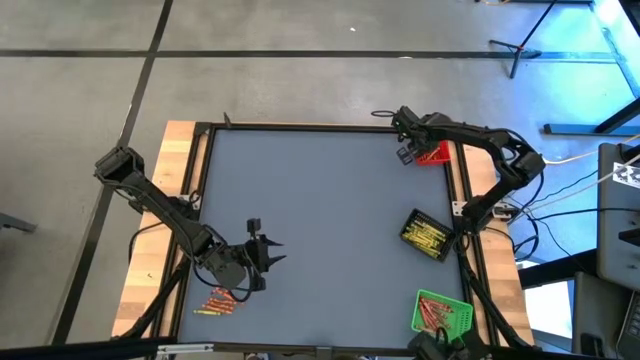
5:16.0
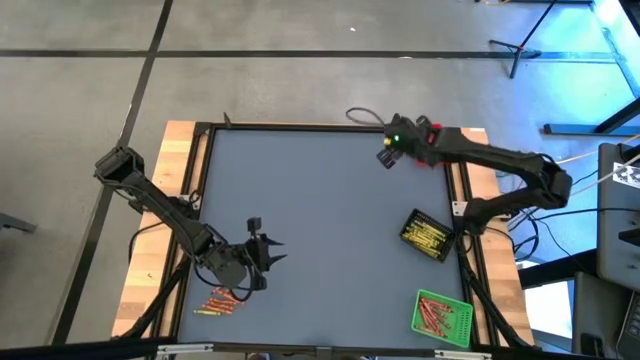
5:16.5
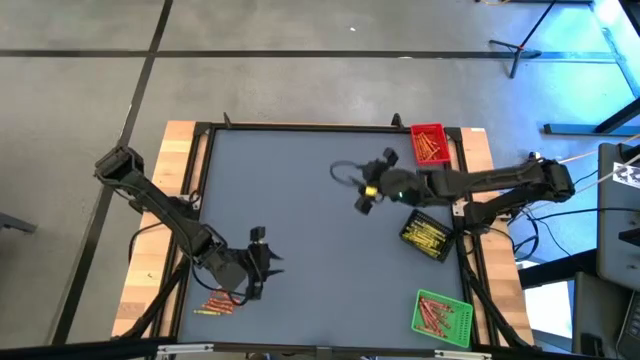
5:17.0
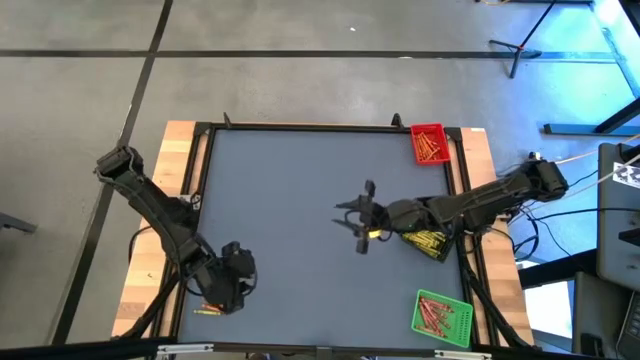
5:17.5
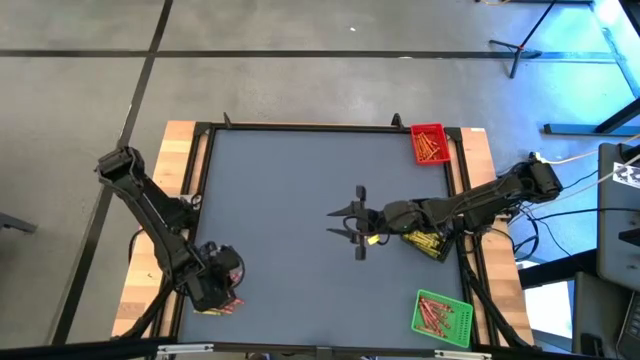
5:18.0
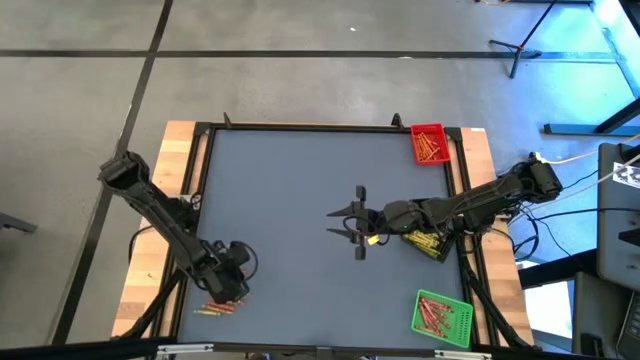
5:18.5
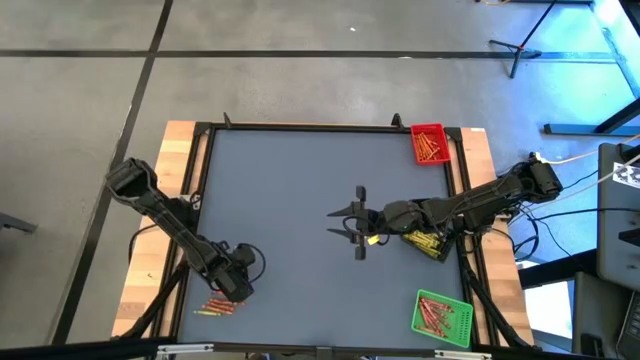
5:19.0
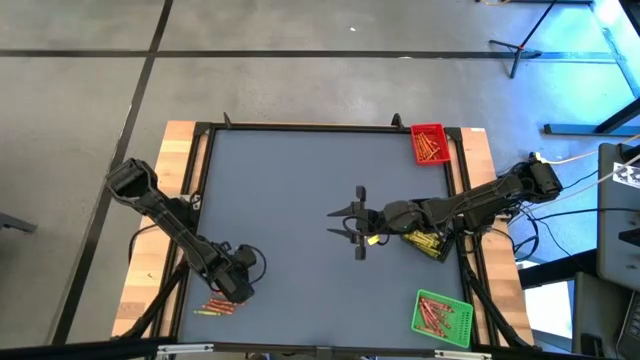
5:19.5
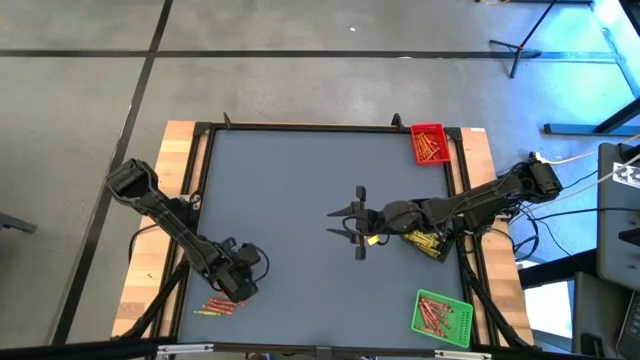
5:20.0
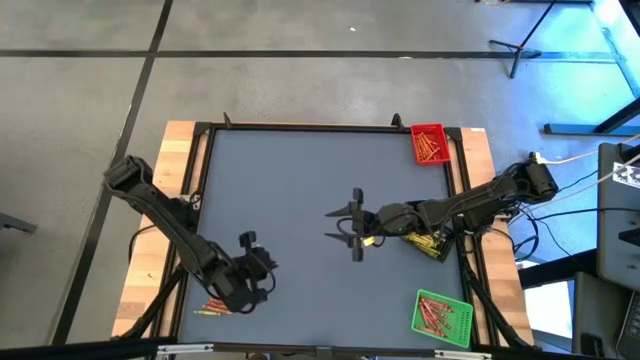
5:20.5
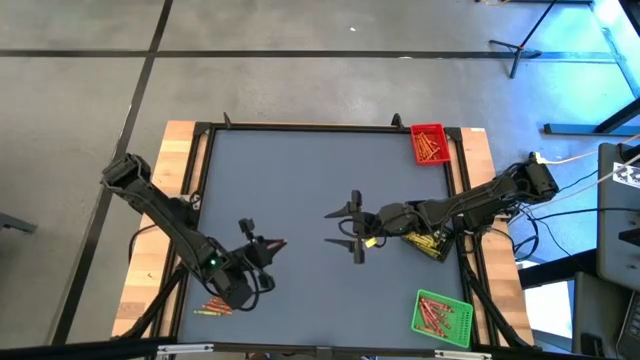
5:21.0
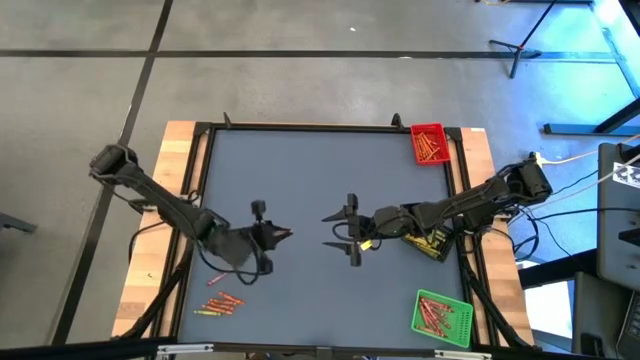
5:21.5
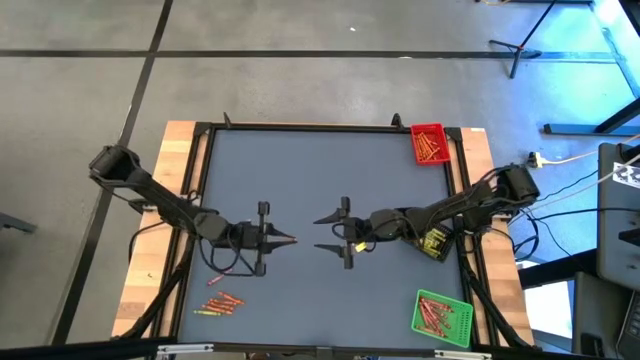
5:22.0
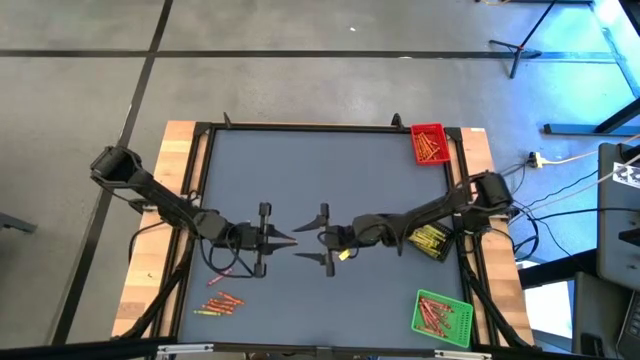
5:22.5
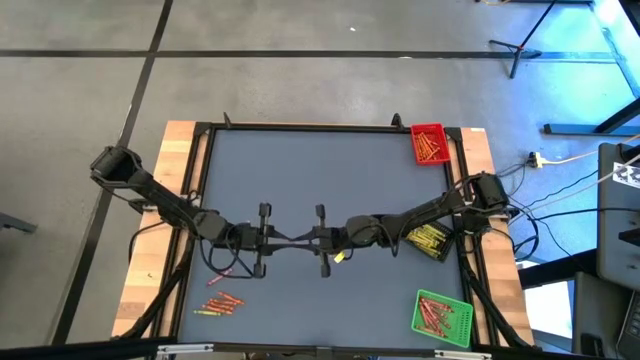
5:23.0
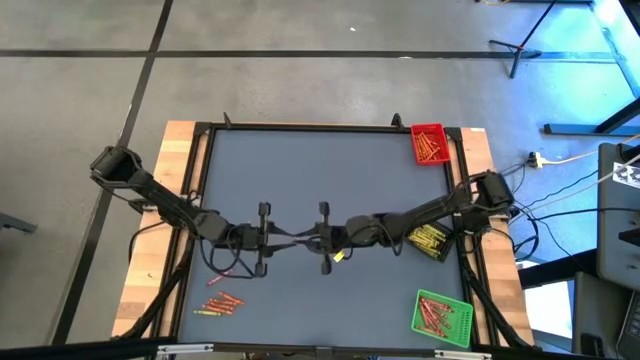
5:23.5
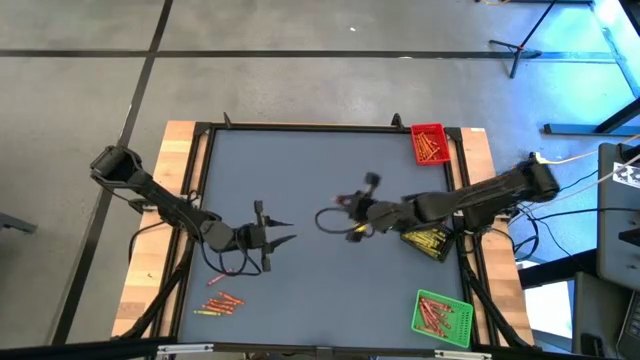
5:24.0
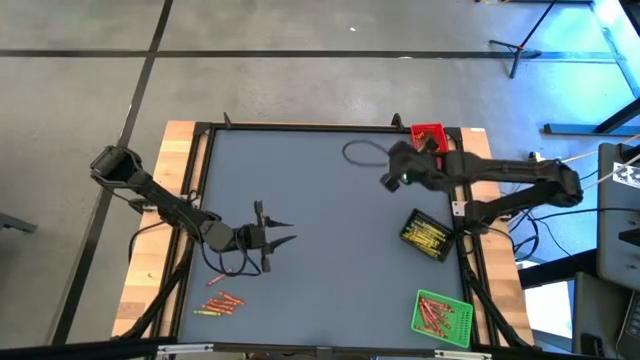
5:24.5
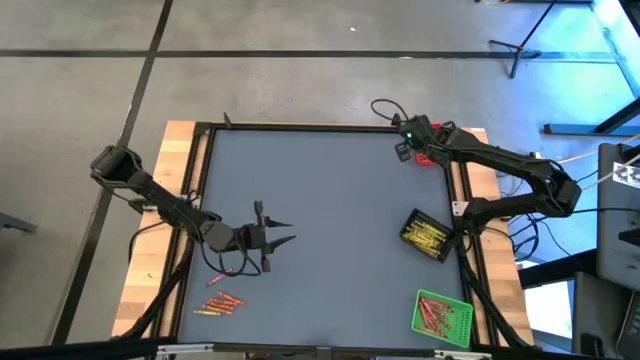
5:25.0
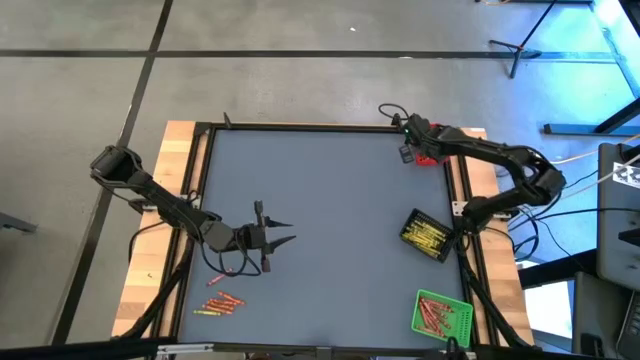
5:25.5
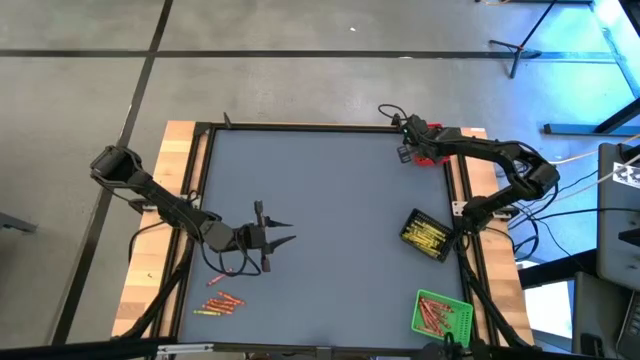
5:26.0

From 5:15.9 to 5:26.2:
Task: Sort crayons
Put the orange crayon into the red basket

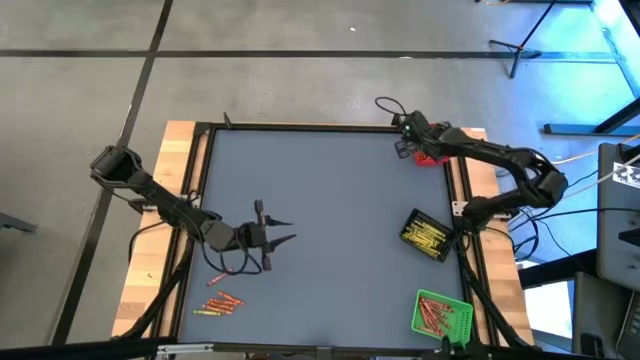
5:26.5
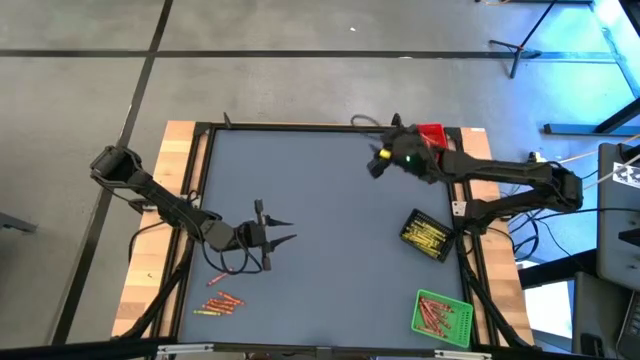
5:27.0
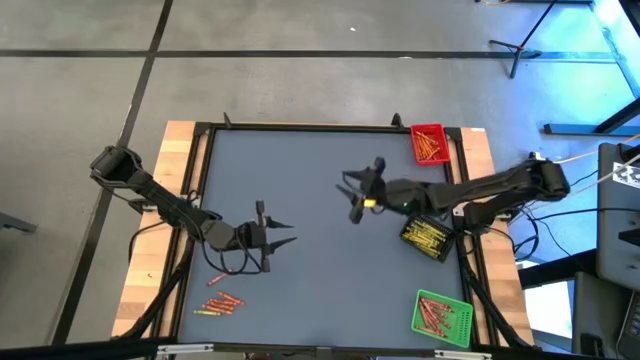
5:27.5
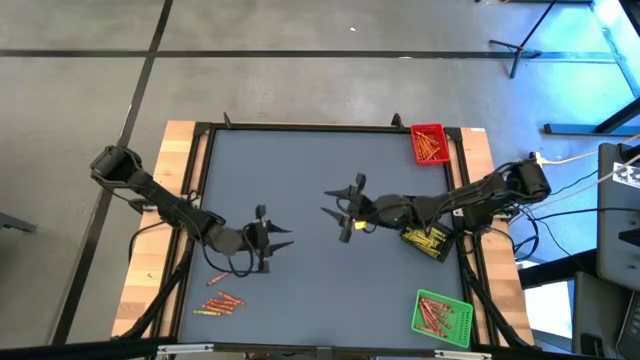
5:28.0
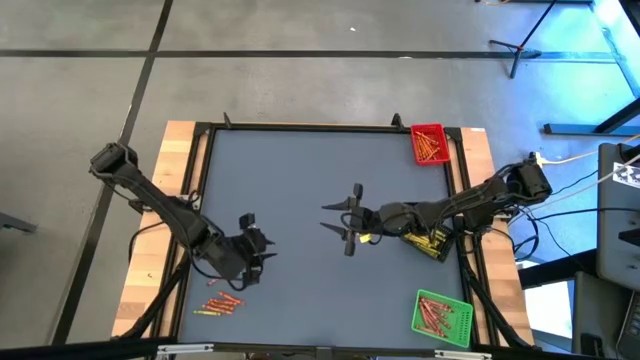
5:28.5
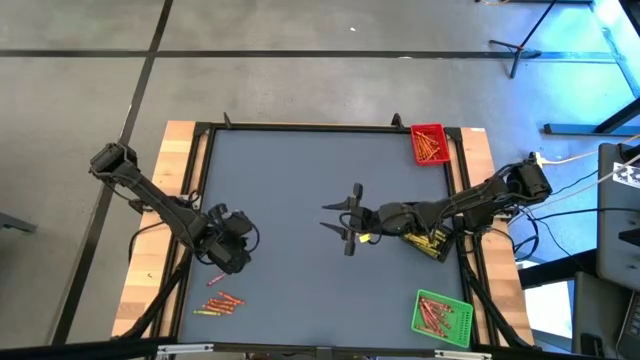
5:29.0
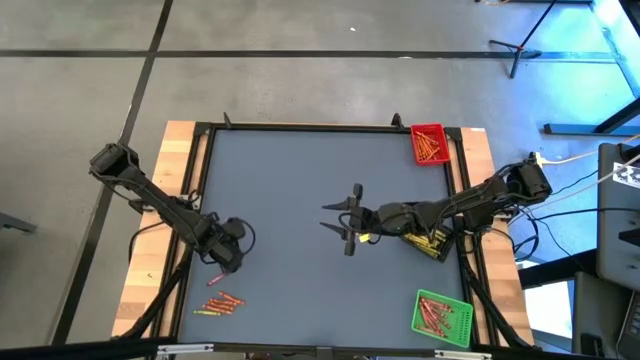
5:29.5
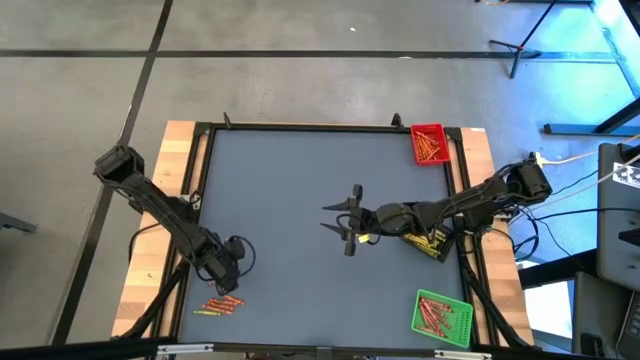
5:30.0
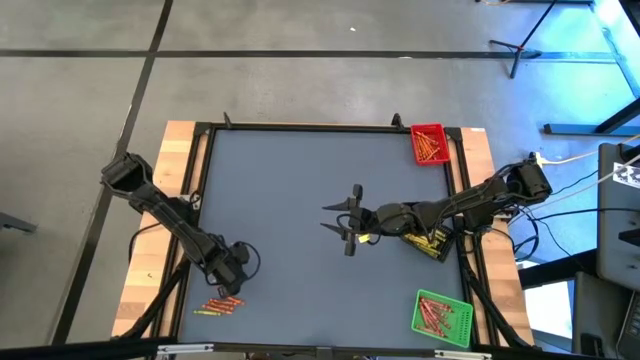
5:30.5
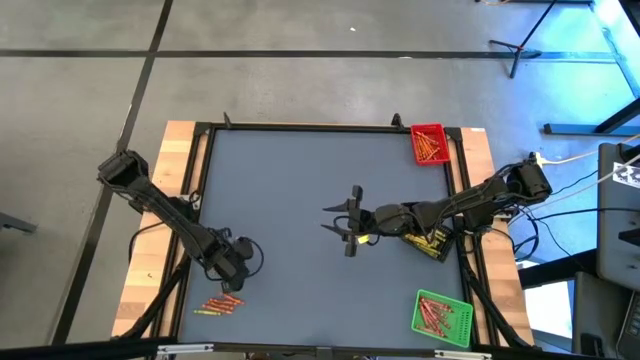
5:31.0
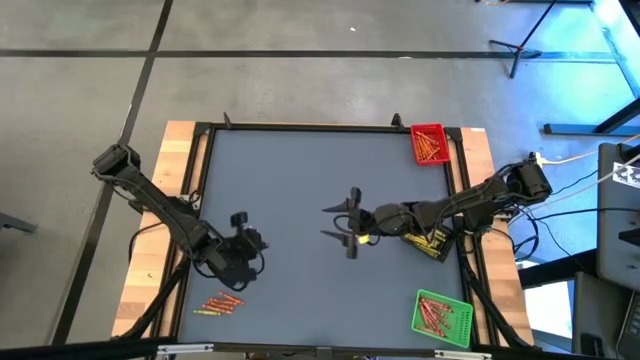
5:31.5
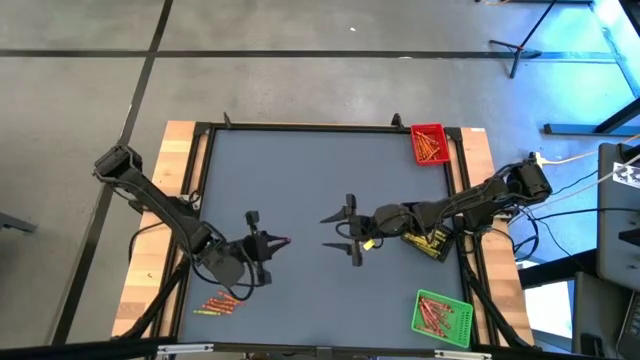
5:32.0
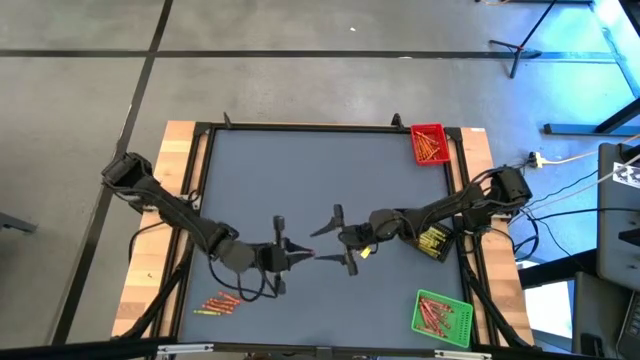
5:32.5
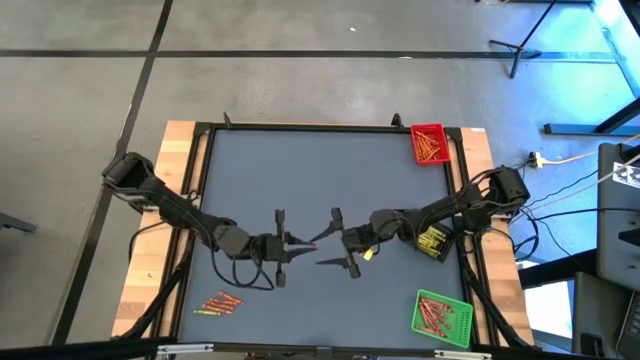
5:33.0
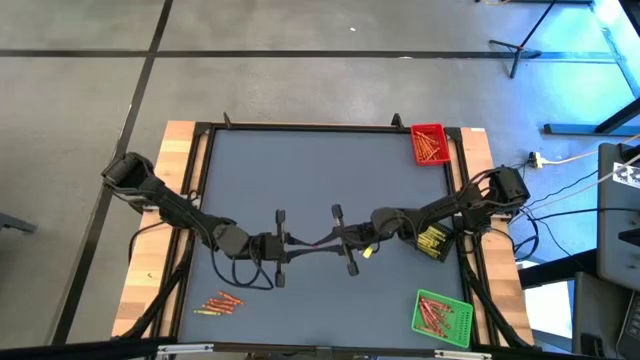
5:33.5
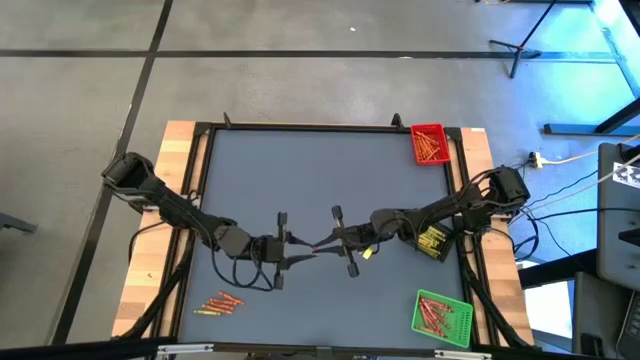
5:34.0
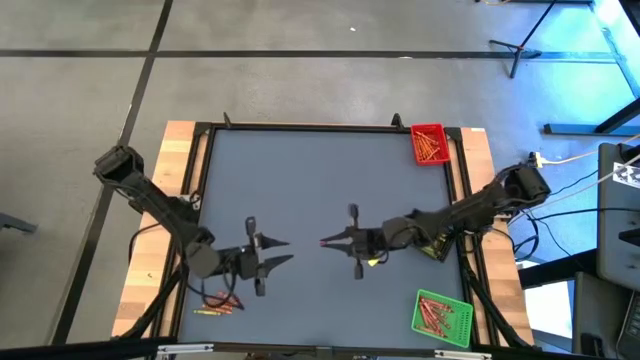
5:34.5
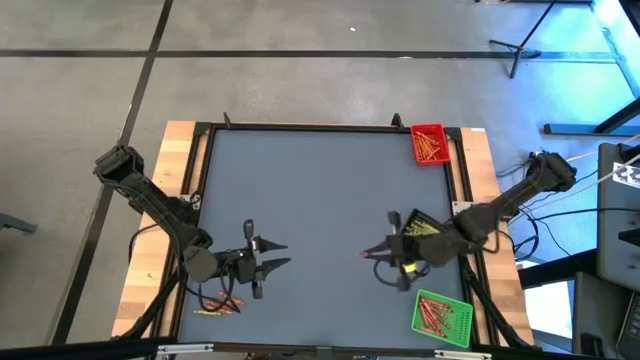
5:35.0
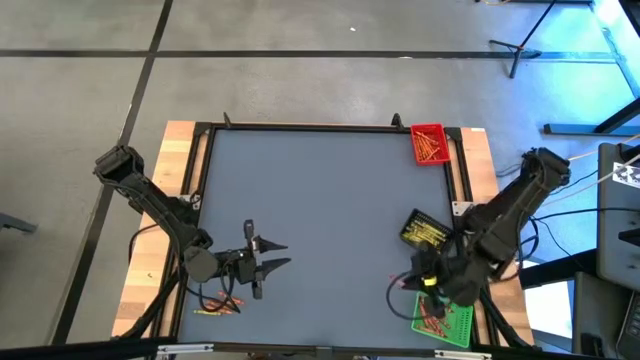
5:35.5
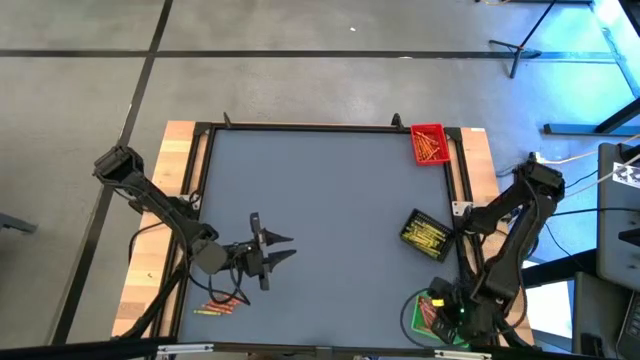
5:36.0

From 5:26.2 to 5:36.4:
Put the red crayon into the green basket
